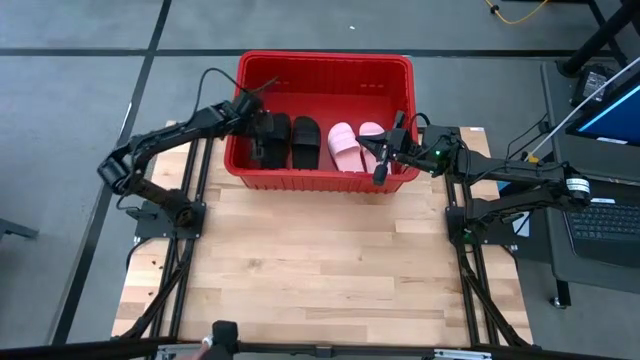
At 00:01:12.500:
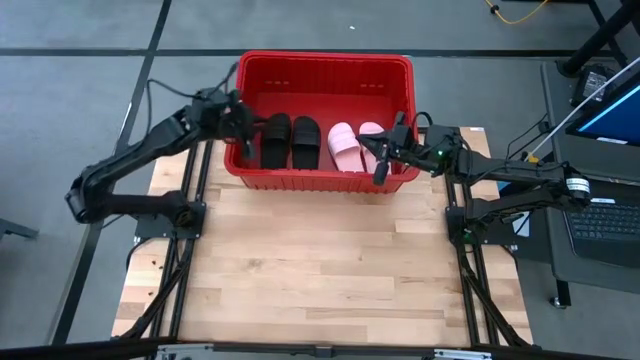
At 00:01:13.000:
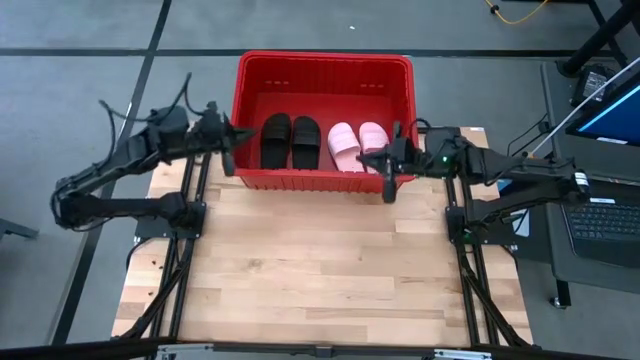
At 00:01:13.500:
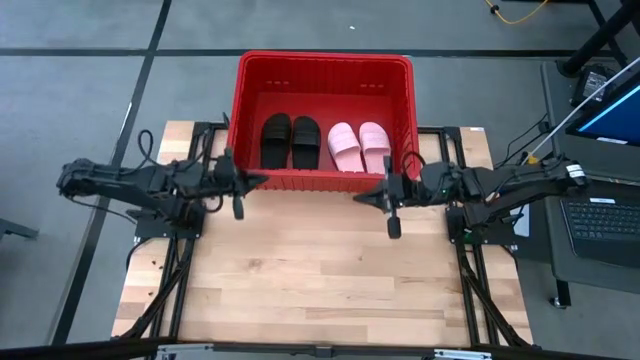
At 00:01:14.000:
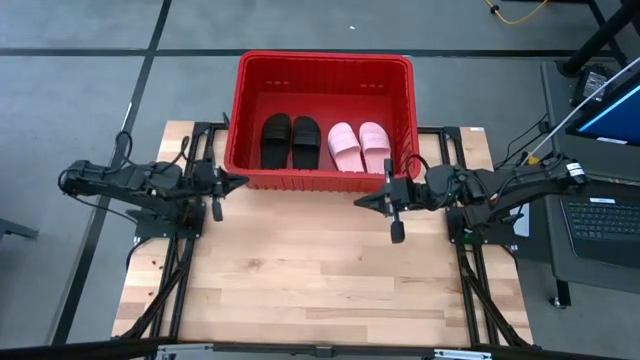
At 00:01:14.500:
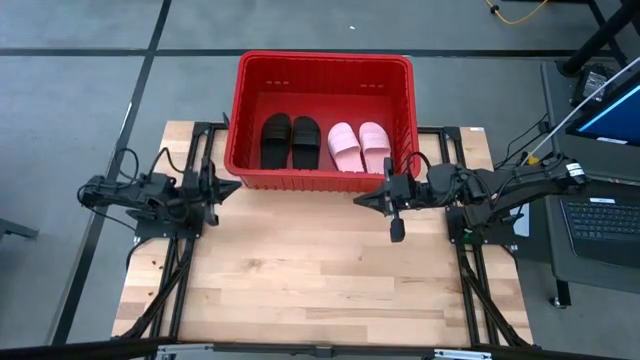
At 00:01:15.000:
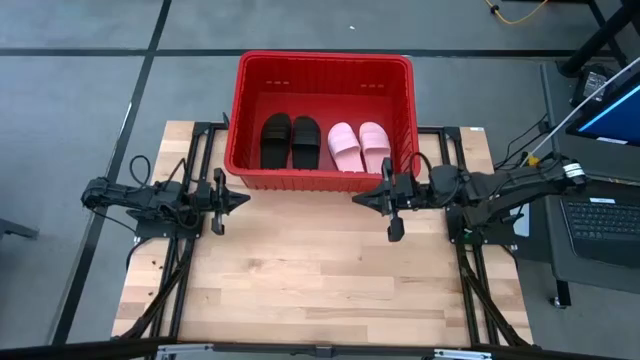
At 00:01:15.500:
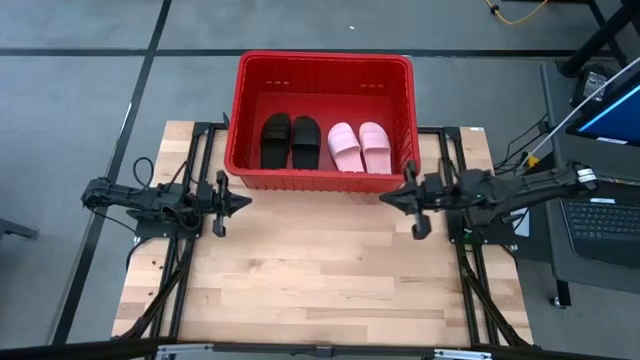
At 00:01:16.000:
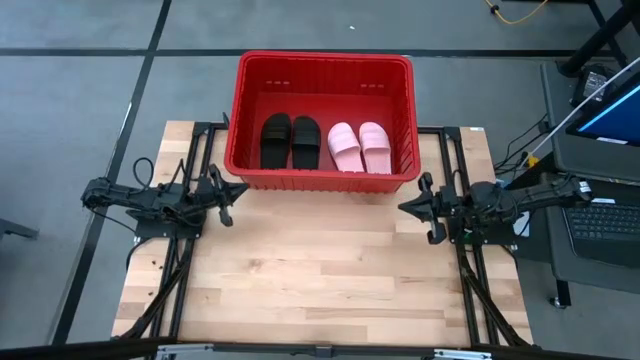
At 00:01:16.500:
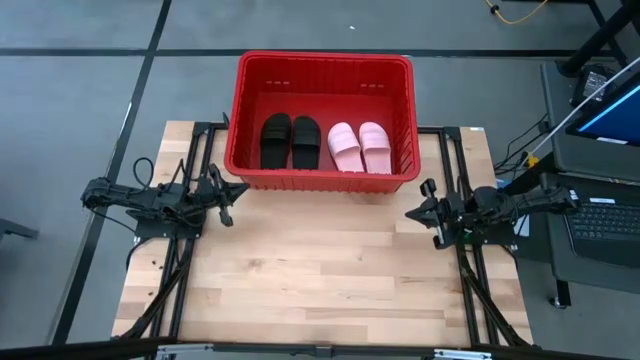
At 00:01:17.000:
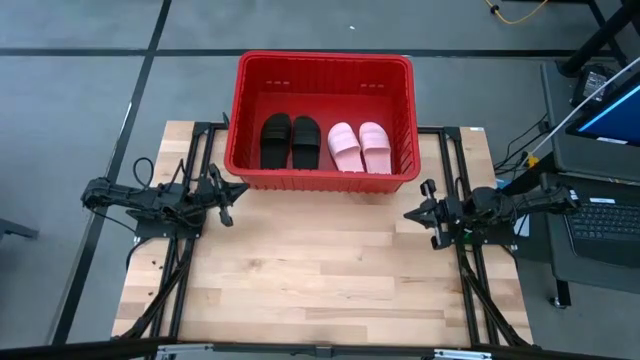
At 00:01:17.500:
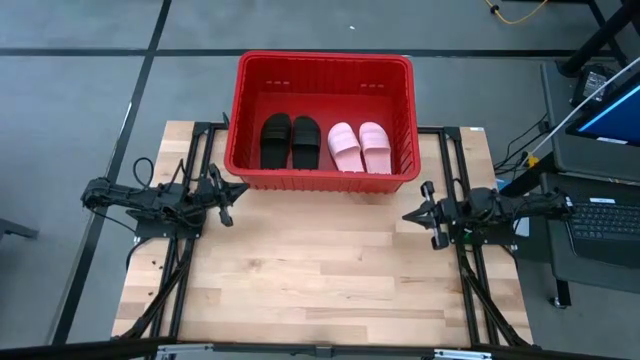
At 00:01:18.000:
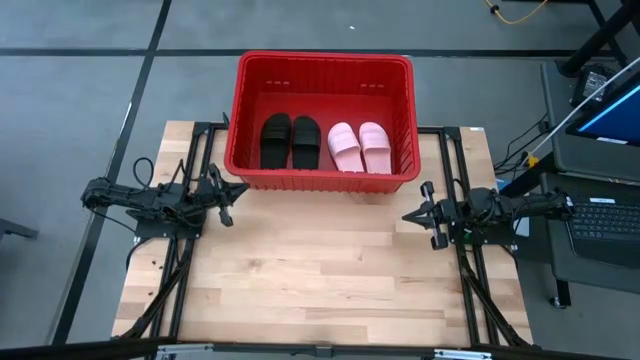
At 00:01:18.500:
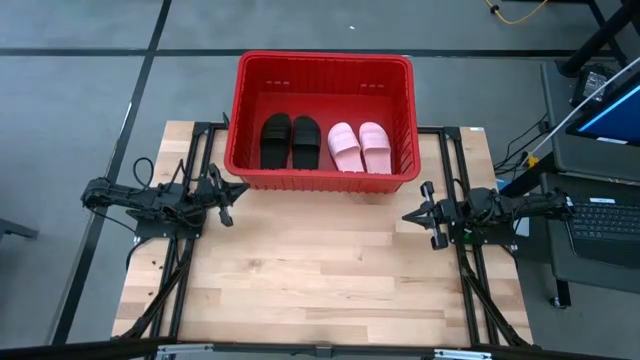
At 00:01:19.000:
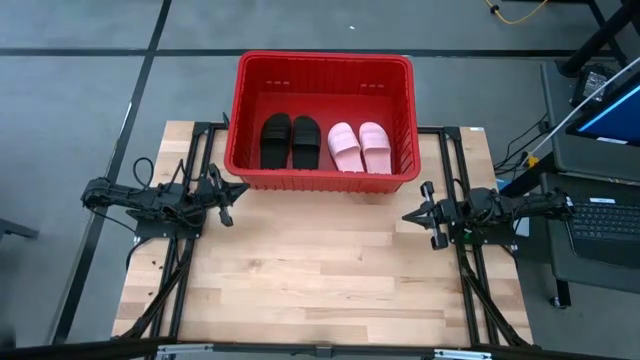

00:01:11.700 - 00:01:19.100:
Task: Pick and place slides into bin
Return to Home Position

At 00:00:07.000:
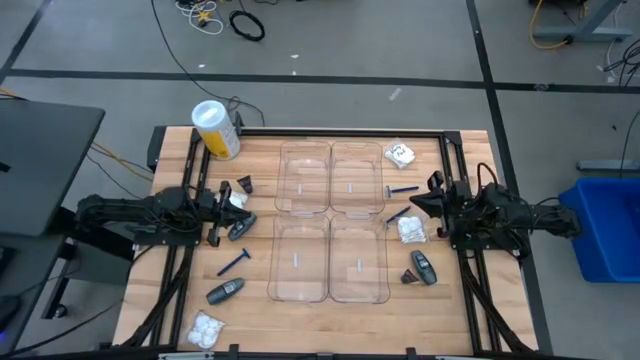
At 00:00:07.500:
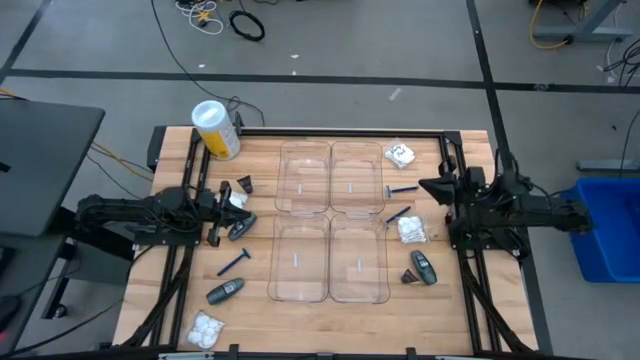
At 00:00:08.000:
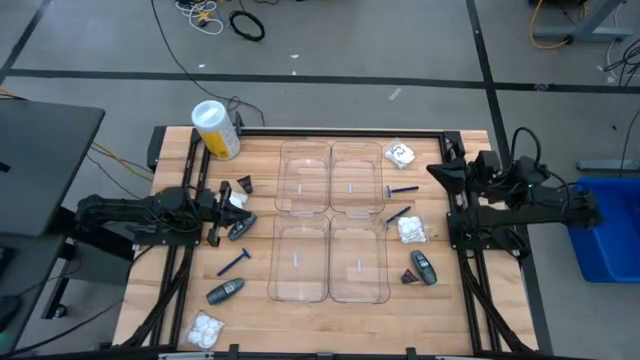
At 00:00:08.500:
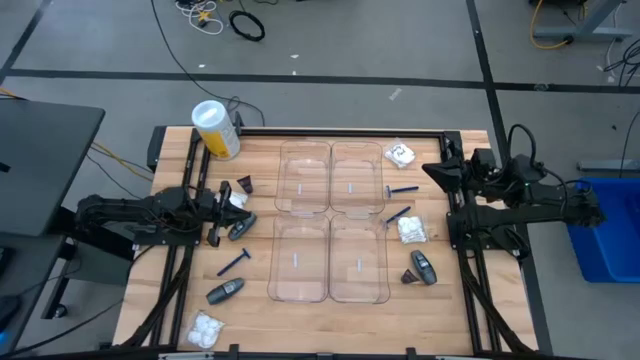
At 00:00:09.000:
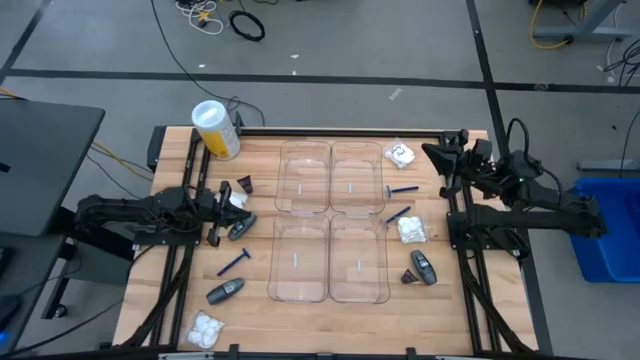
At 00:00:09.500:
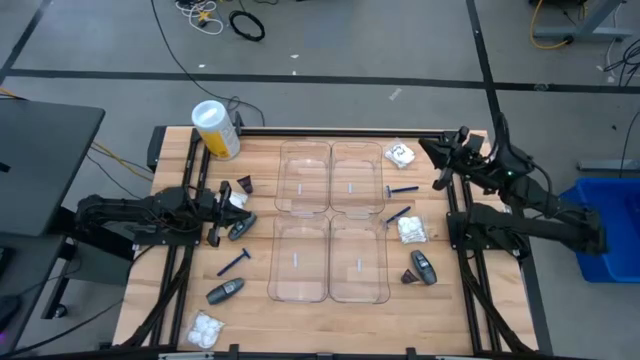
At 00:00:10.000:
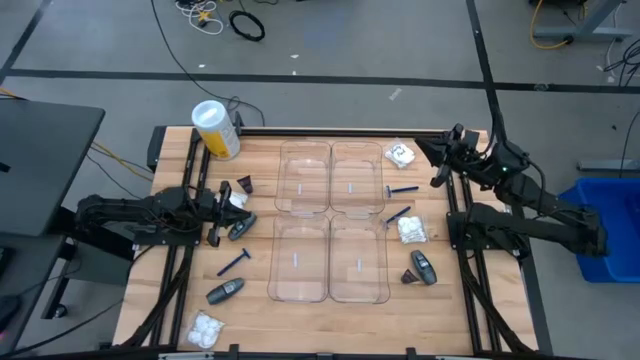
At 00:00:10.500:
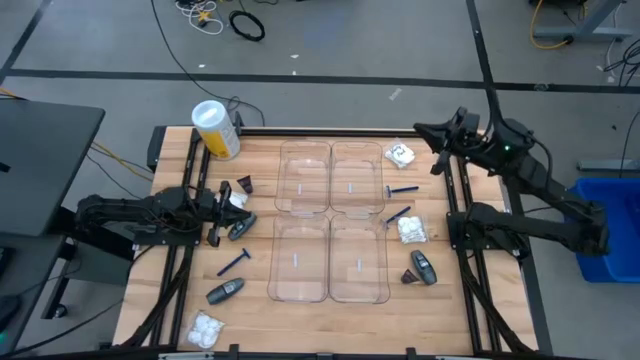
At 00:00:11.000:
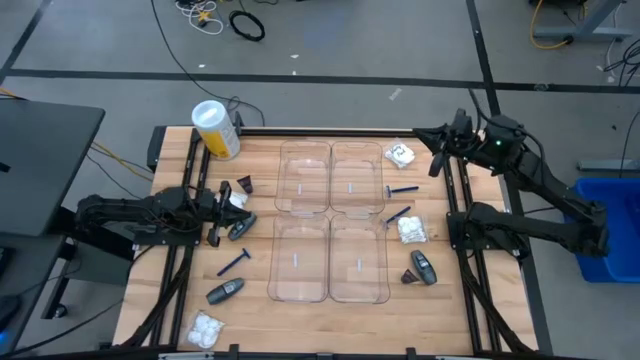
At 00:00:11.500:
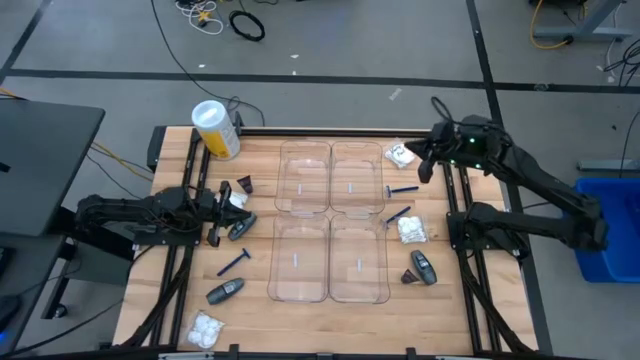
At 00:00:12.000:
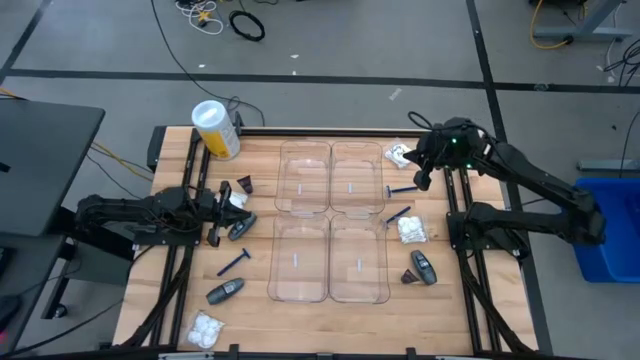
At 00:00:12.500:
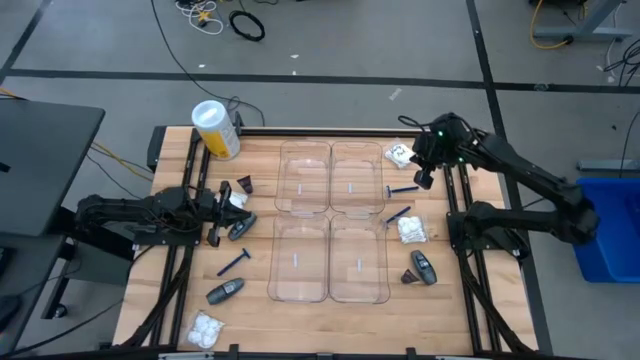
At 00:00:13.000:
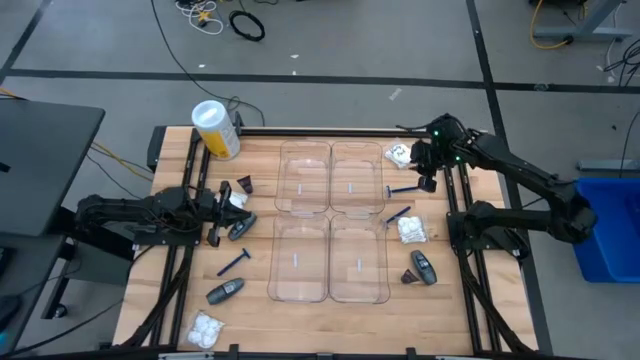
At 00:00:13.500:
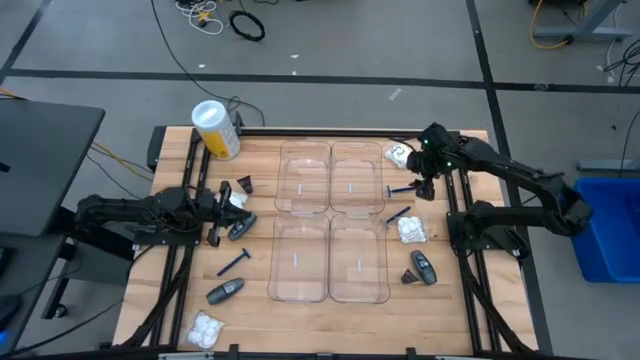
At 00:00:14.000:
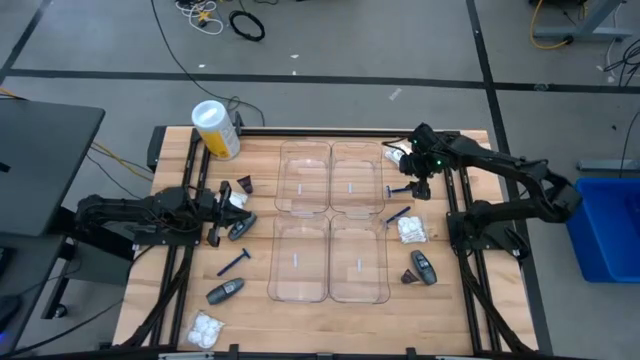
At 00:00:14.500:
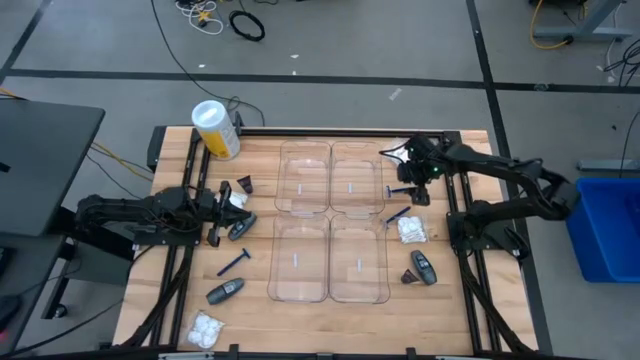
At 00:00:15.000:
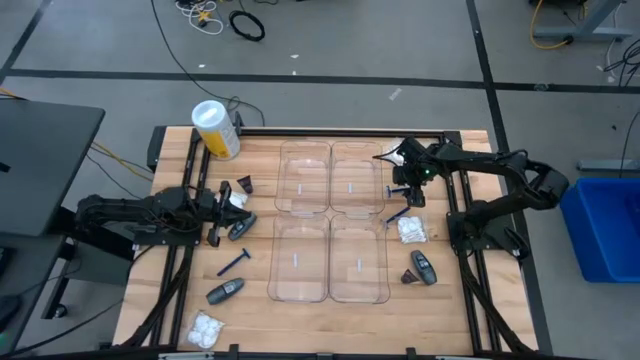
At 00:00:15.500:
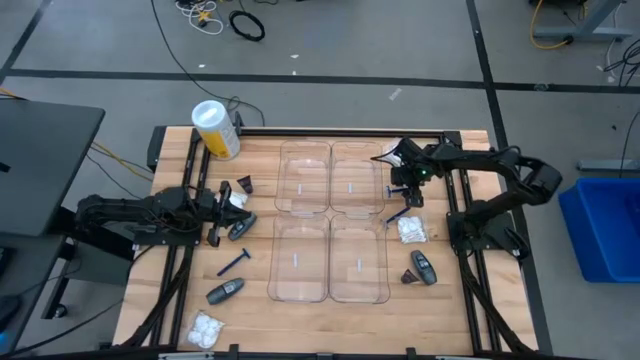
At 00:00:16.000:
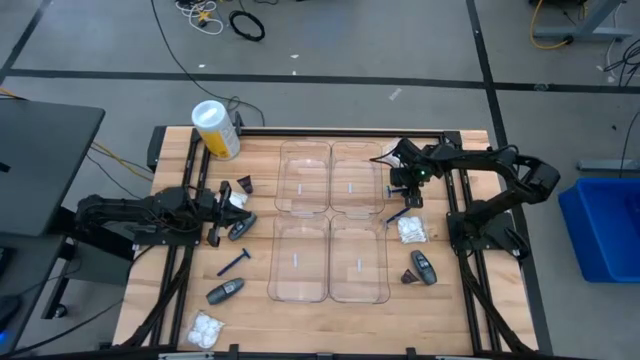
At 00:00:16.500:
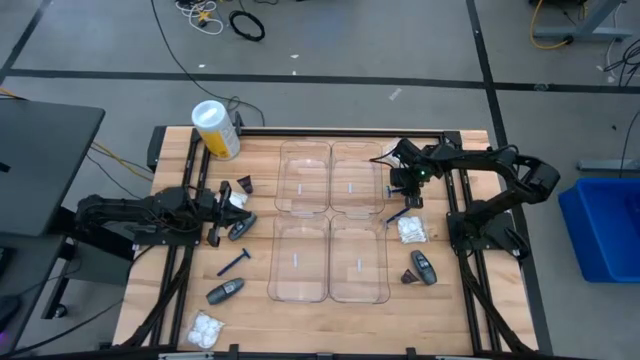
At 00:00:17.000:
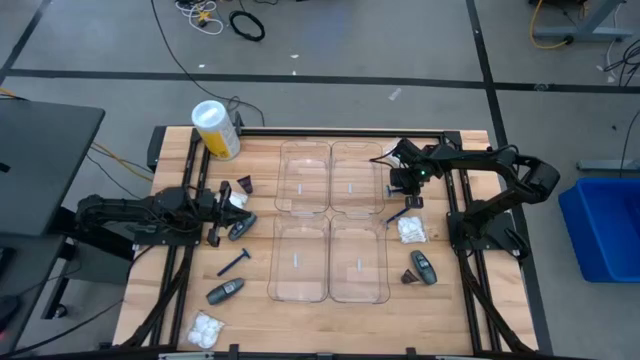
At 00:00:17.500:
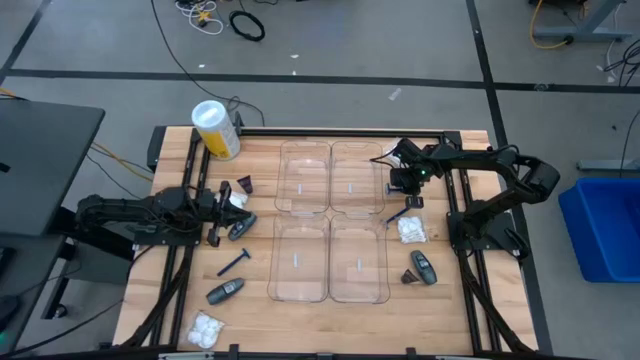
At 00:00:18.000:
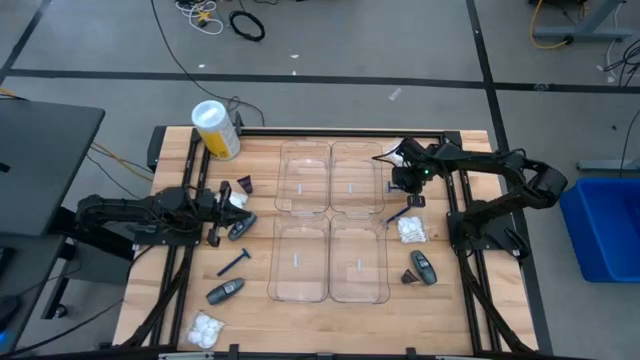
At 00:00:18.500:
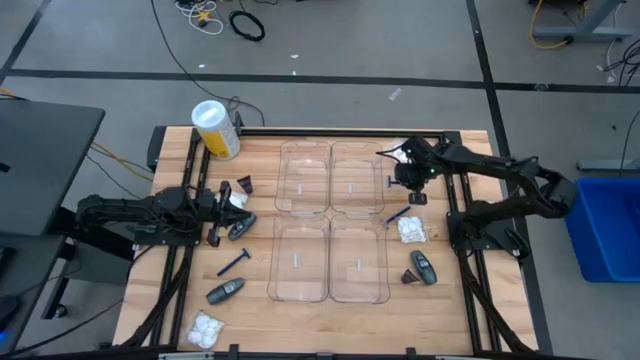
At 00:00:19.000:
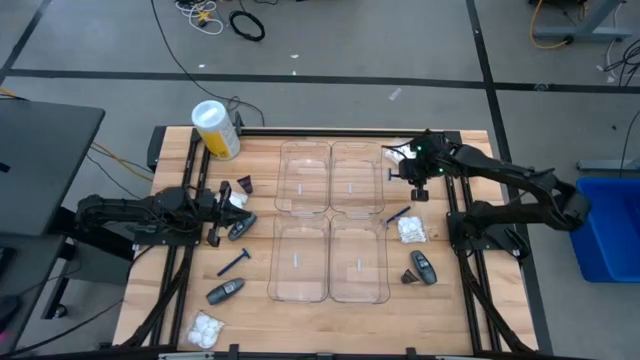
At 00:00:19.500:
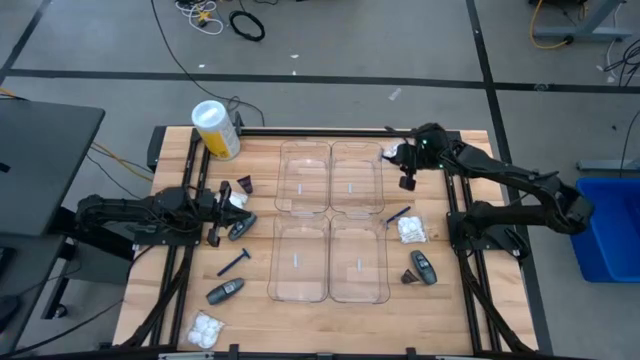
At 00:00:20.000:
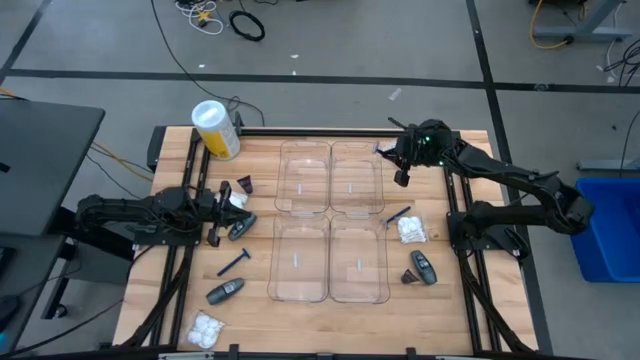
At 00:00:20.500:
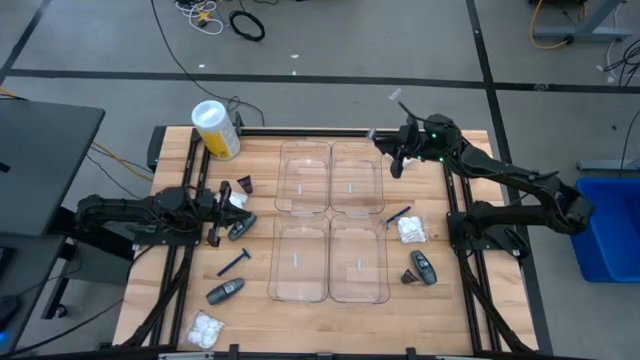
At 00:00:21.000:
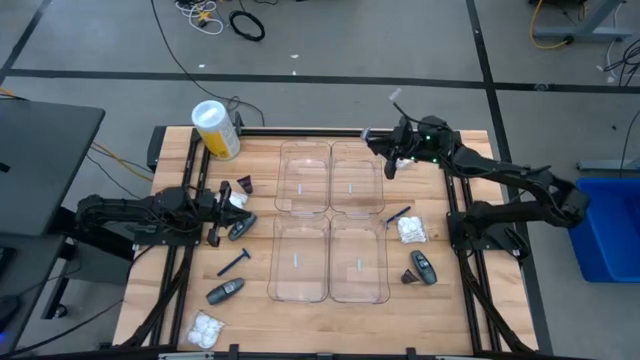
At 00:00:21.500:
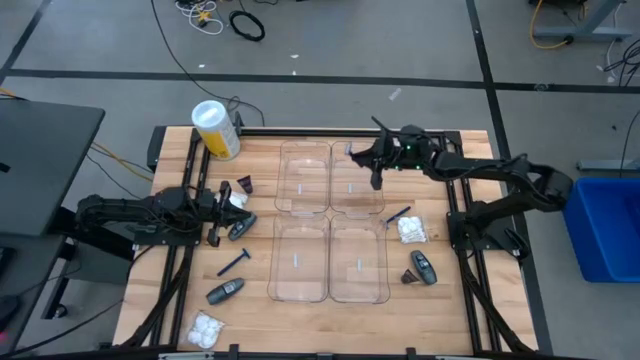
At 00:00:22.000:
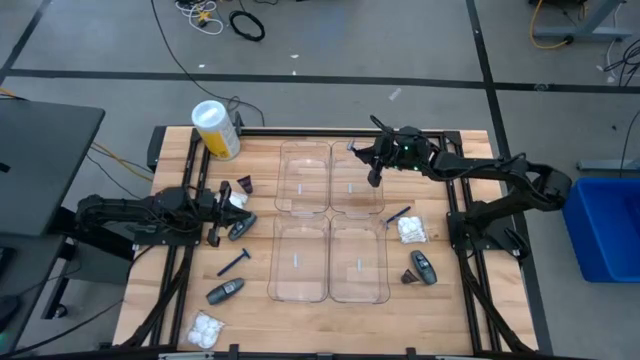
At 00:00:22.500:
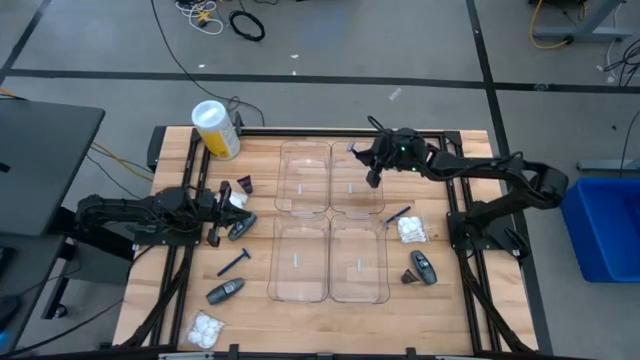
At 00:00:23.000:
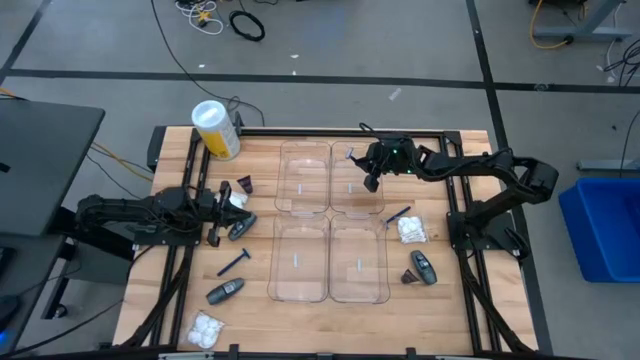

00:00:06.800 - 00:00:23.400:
Task: Pick & Place Travel size toiletries
Put the top razor into the top right transparent bin
